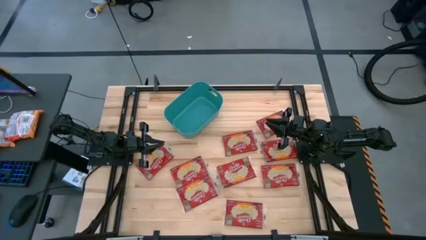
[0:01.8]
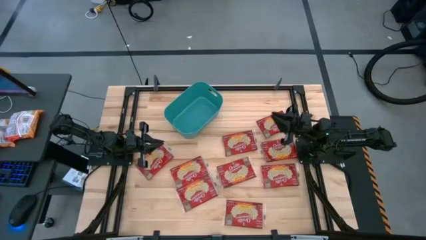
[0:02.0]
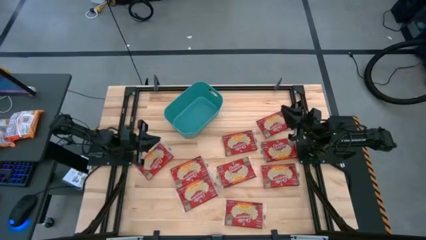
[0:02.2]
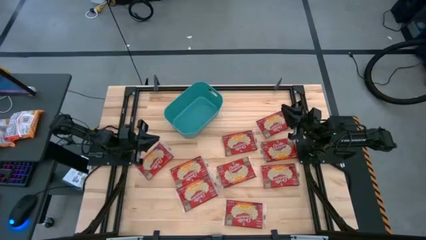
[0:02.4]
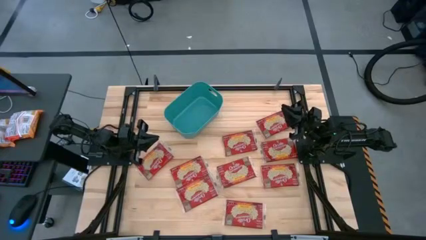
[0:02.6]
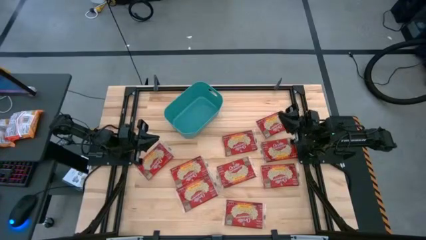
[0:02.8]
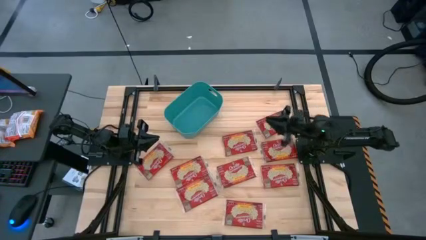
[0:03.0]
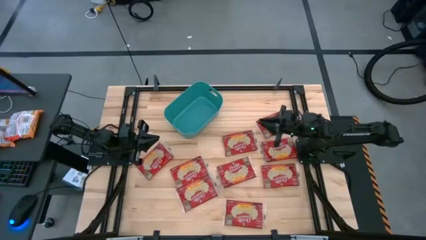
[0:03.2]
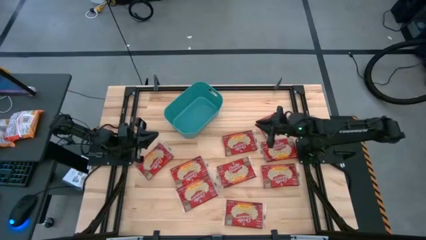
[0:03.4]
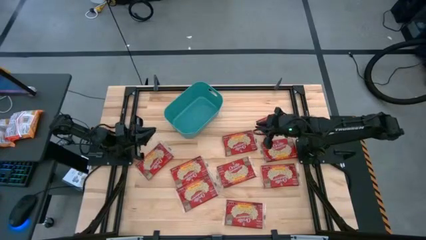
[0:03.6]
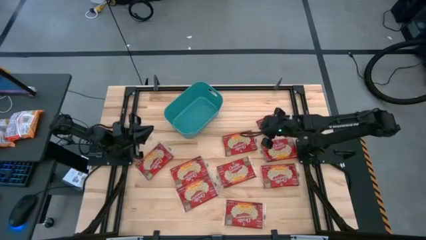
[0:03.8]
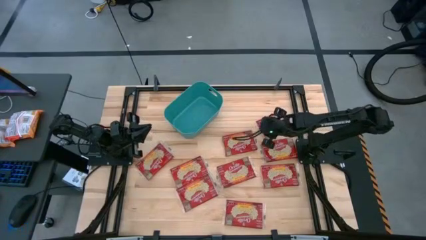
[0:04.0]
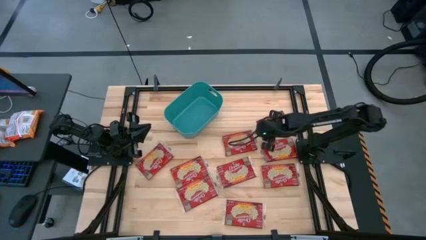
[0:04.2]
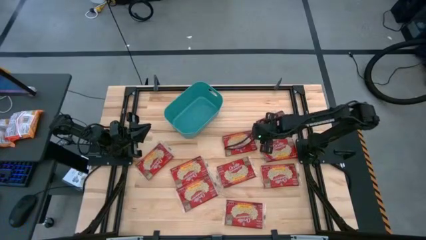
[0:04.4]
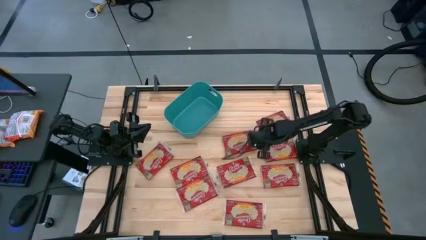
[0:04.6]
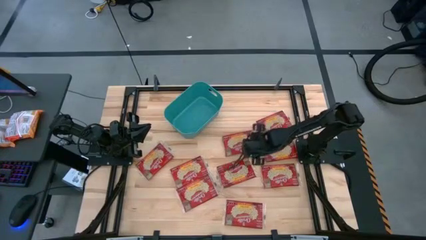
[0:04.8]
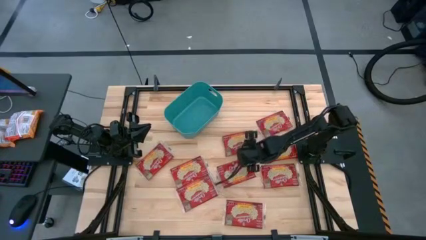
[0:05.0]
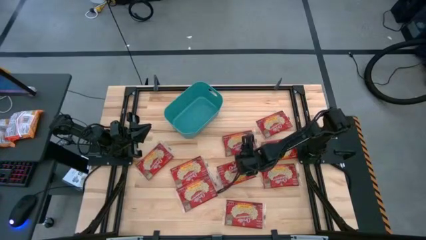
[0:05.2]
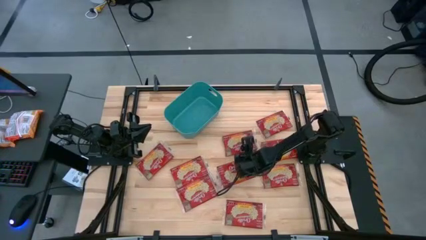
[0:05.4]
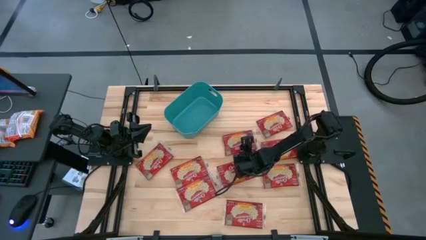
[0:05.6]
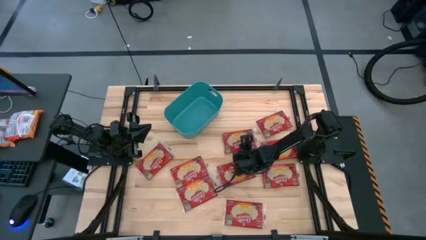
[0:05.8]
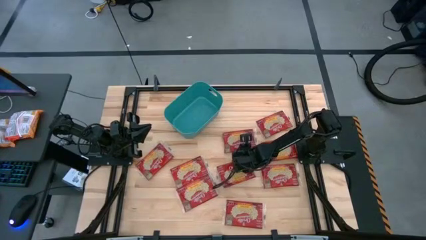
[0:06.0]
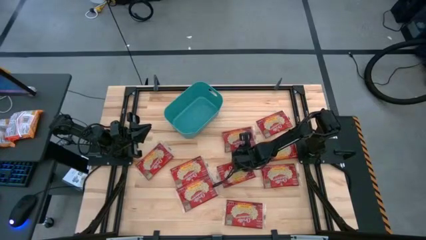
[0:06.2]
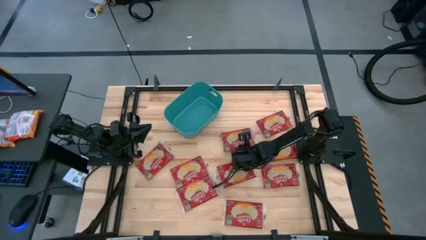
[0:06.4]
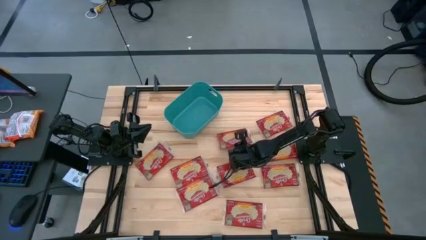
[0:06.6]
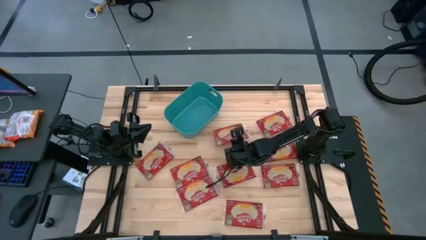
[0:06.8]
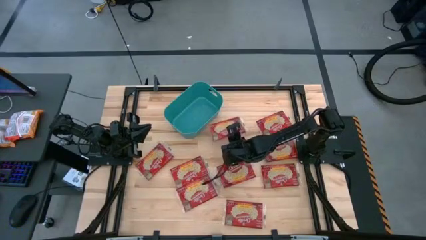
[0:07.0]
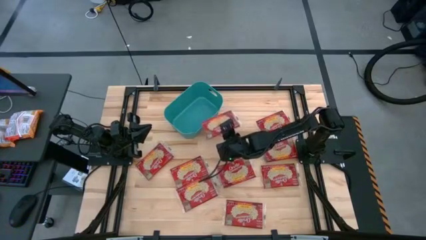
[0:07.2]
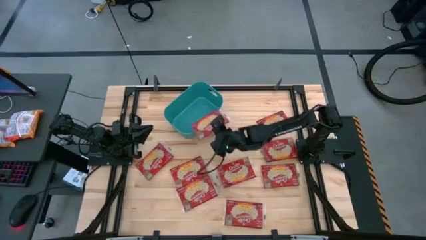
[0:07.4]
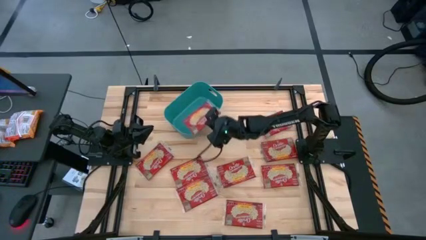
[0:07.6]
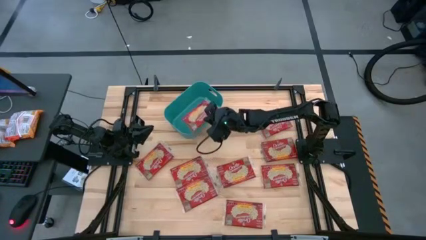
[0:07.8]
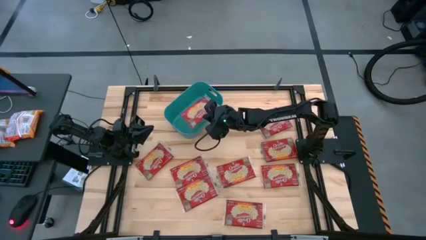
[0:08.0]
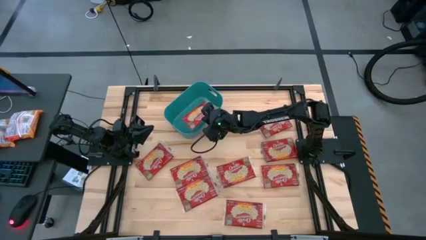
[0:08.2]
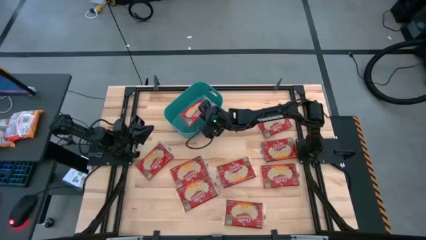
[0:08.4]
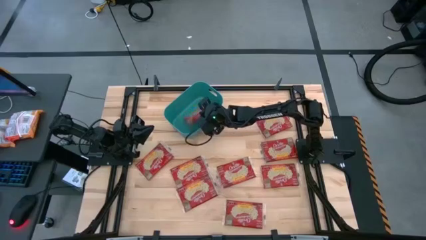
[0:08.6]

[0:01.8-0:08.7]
Task: Sort popcorn bags into baskets
Put the red popcorn pack into the blue bin

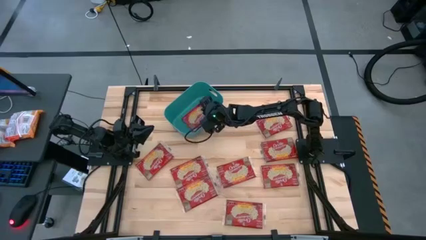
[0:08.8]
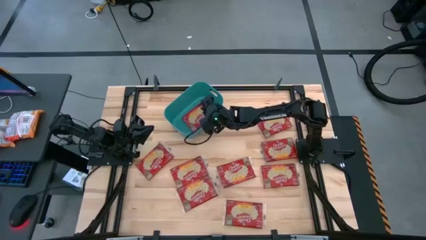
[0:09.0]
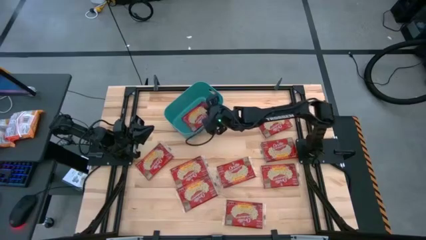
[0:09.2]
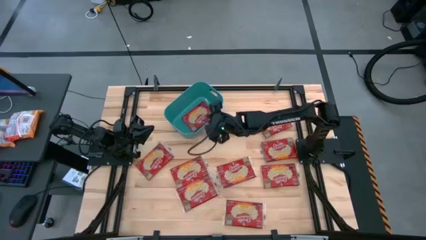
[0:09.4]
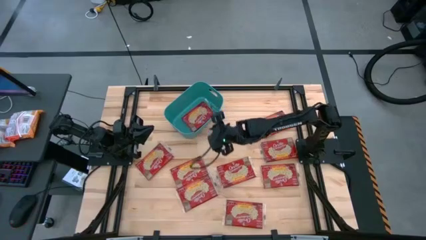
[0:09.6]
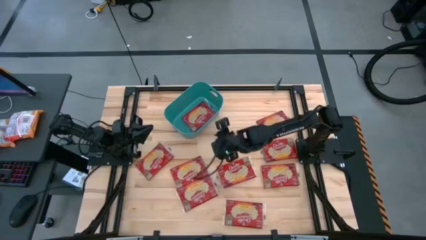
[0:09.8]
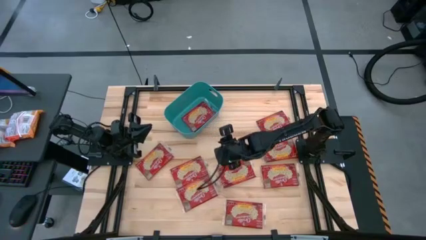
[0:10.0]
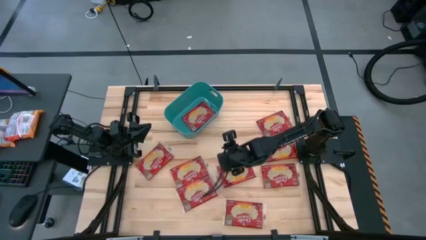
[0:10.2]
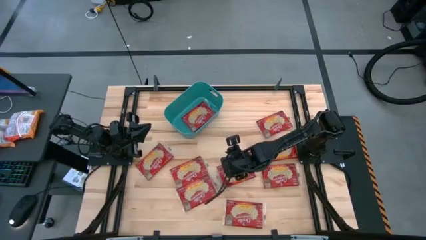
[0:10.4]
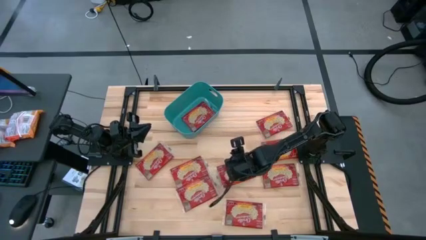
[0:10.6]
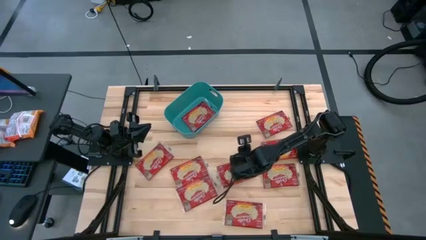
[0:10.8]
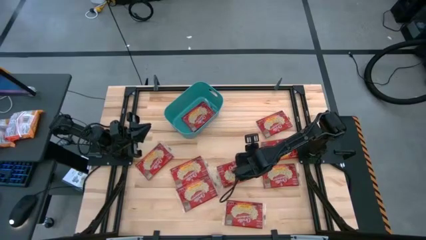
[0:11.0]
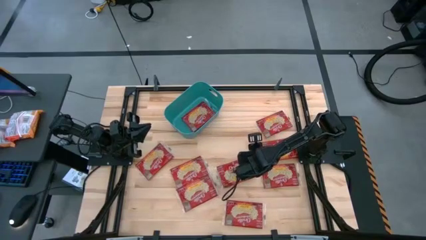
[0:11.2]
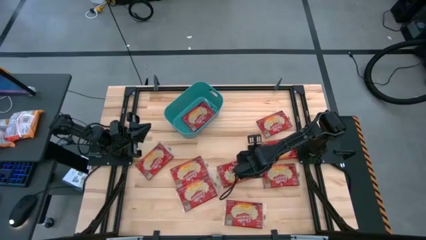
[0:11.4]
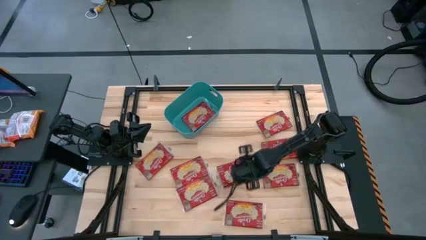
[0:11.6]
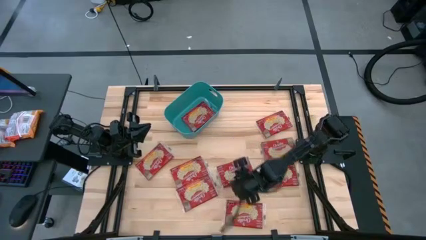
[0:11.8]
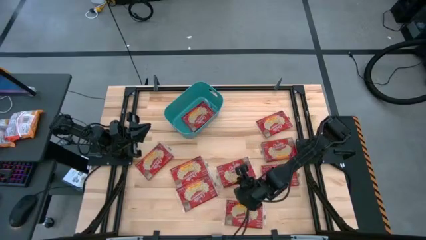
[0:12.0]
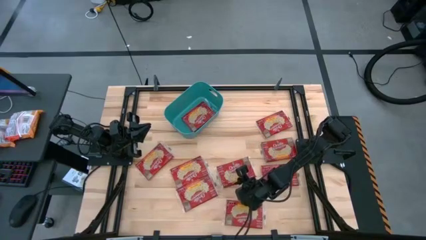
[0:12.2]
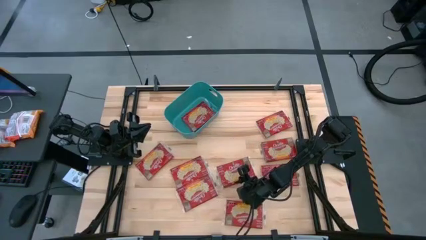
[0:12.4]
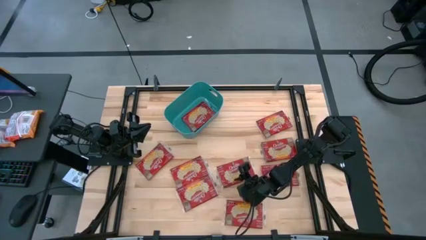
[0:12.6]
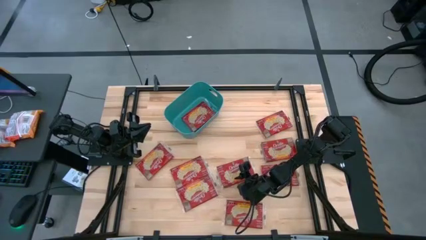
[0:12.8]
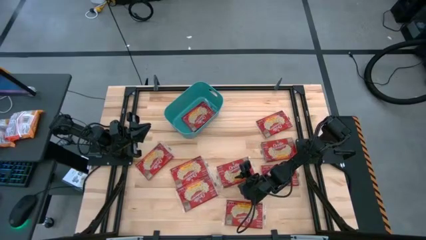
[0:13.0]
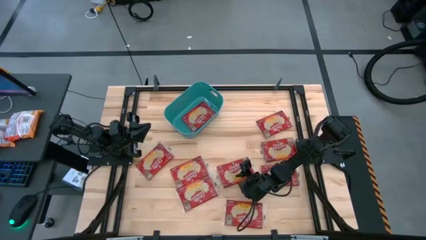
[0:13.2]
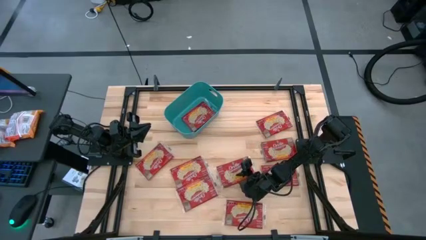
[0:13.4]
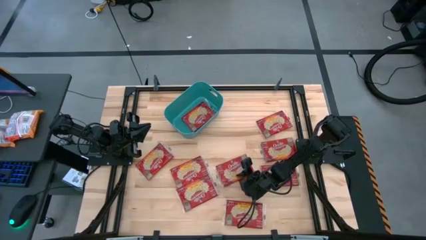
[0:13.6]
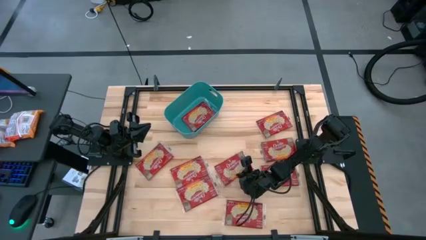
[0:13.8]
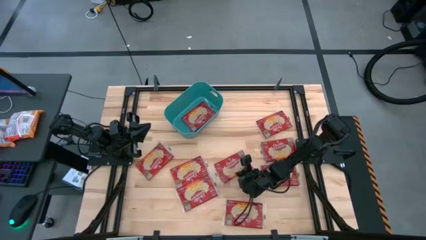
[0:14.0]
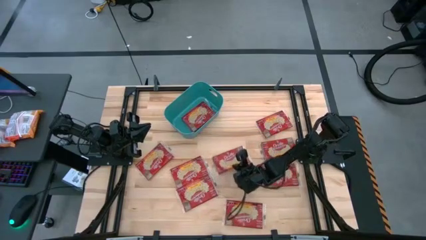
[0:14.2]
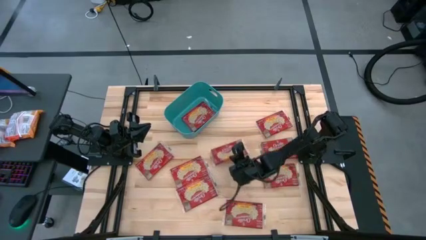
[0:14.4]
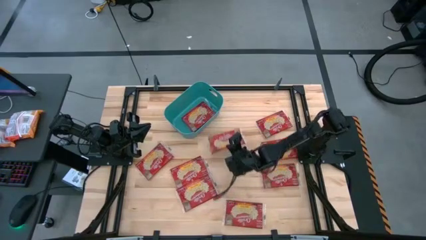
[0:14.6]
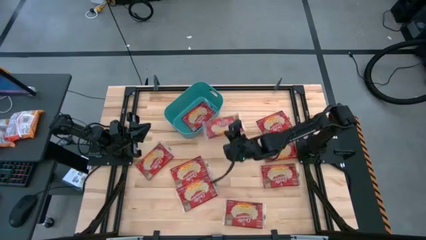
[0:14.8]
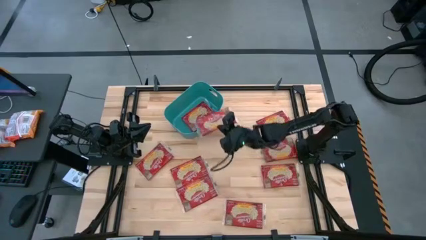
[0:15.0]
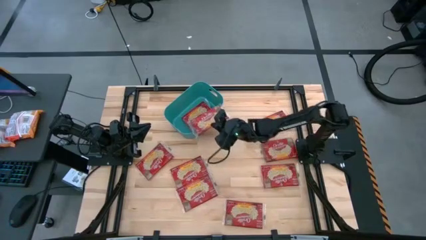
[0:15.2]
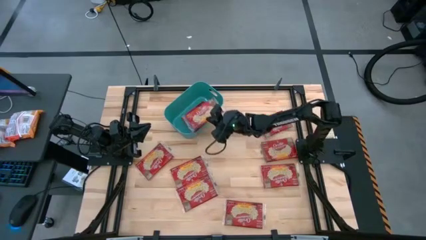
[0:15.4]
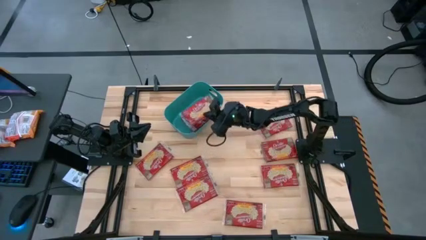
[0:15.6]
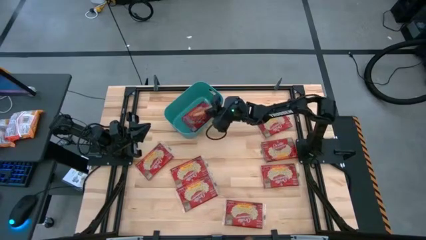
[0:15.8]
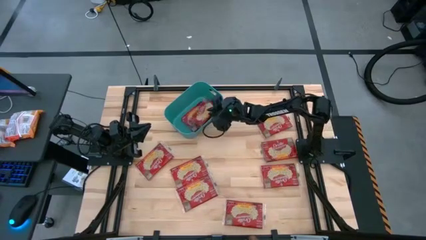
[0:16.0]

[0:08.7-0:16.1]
Put the red popcorn pack into the blue bin

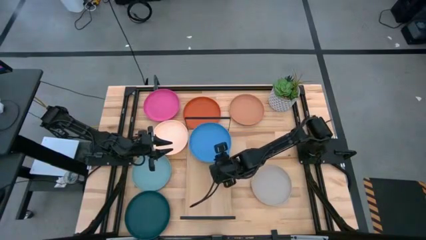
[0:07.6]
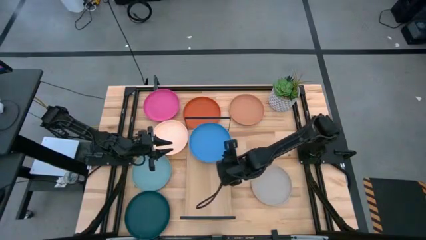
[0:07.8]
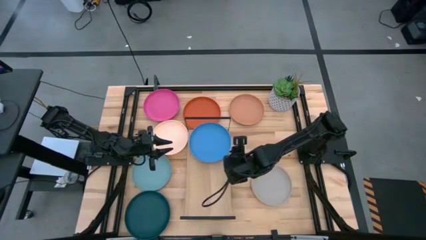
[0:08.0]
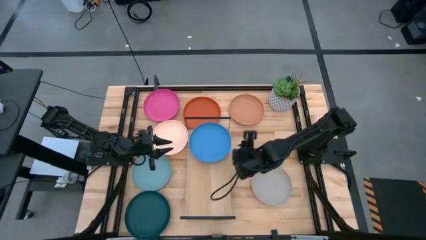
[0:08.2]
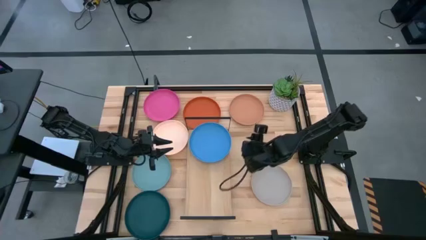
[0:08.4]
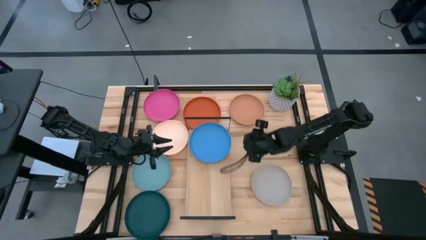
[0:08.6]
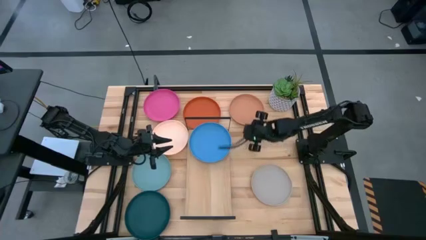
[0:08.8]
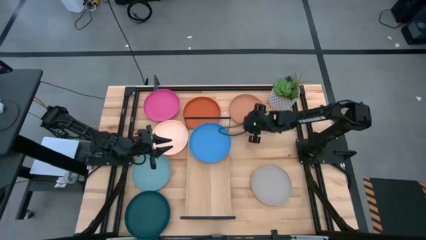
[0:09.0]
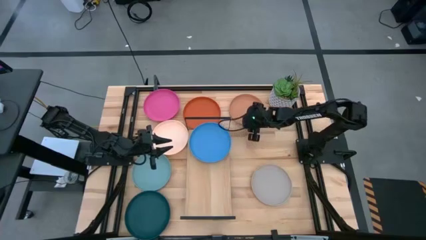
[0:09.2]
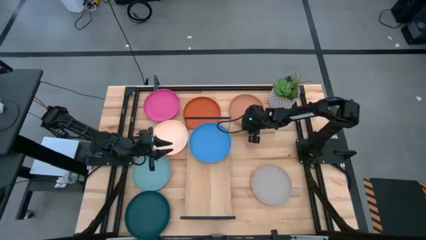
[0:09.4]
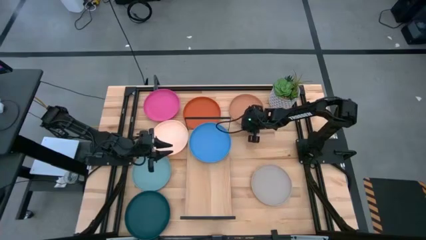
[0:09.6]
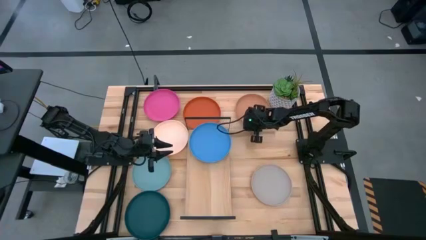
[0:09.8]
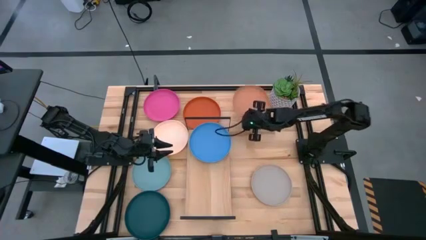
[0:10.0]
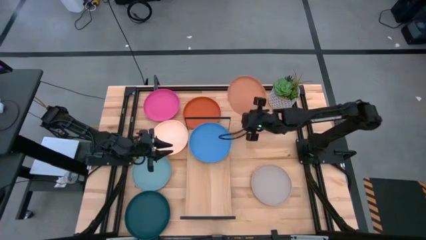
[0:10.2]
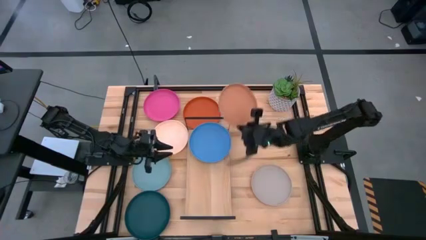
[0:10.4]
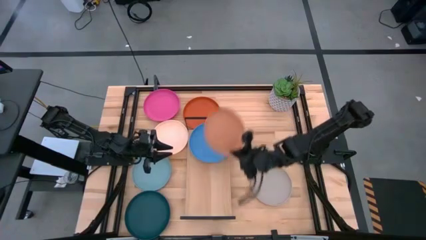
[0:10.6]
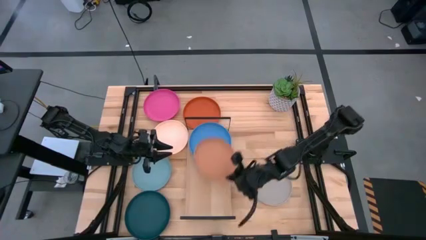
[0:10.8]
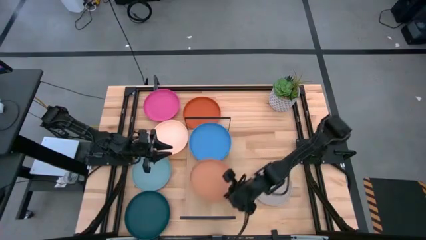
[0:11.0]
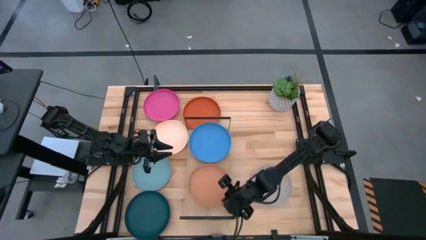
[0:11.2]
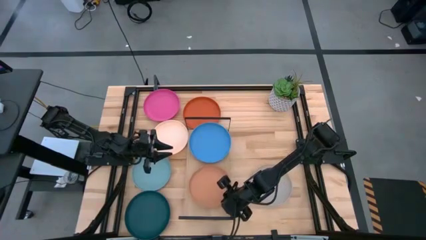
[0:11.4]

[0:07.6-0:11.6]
Task: Place and stack plates onto a shelf
Put the light brown plate on the shelf
